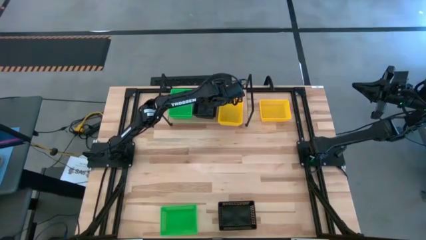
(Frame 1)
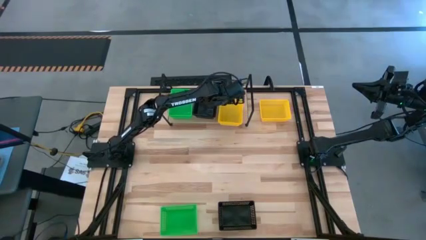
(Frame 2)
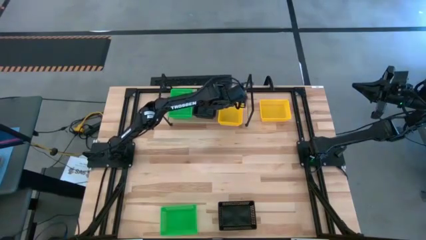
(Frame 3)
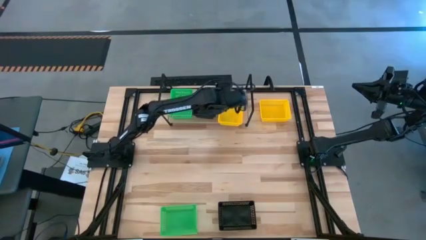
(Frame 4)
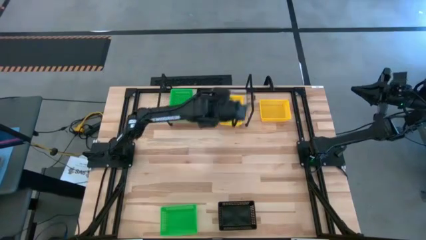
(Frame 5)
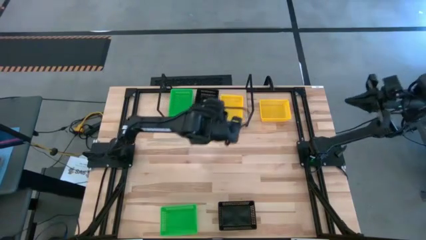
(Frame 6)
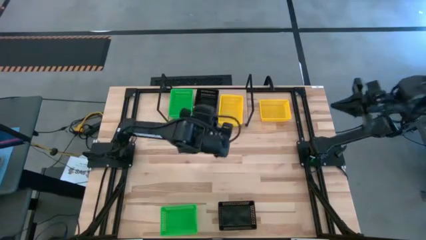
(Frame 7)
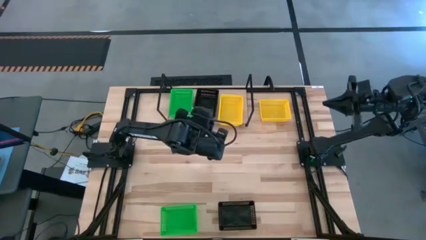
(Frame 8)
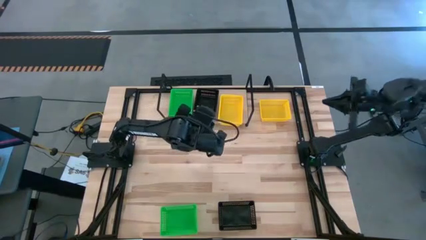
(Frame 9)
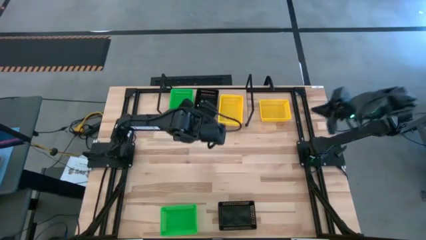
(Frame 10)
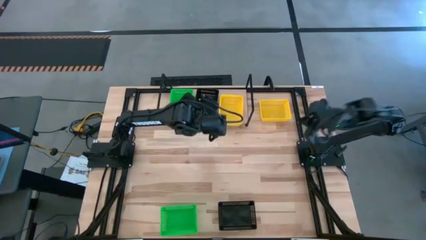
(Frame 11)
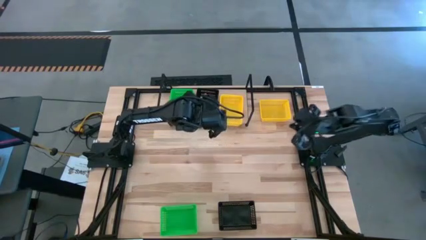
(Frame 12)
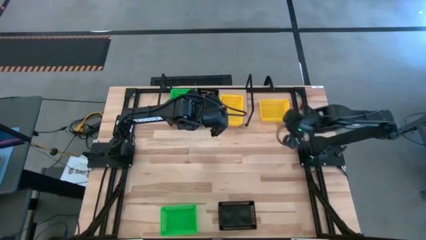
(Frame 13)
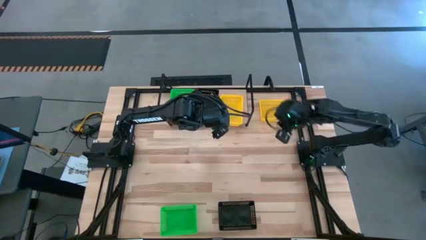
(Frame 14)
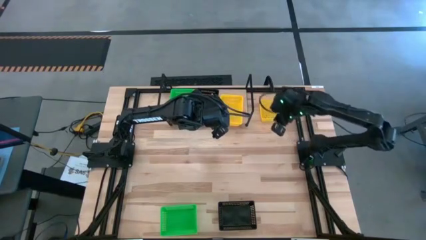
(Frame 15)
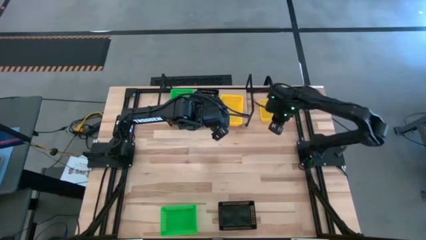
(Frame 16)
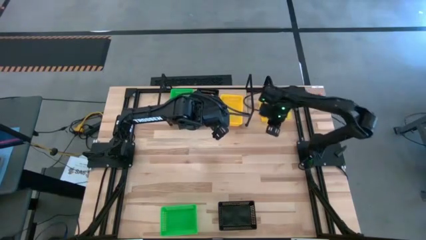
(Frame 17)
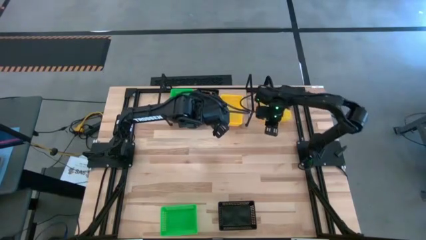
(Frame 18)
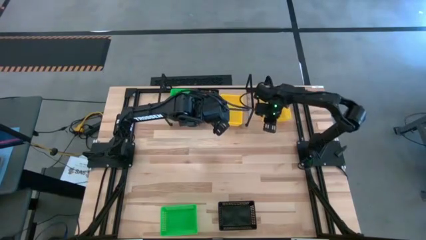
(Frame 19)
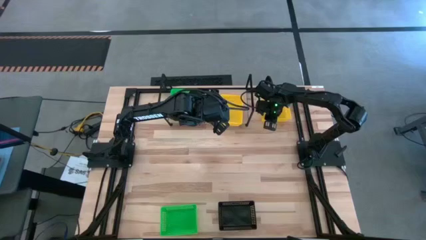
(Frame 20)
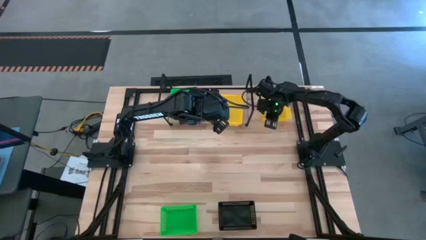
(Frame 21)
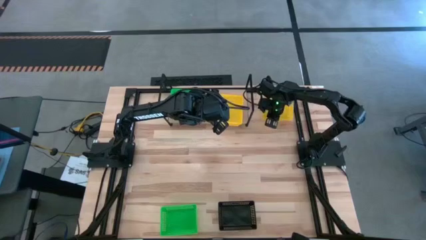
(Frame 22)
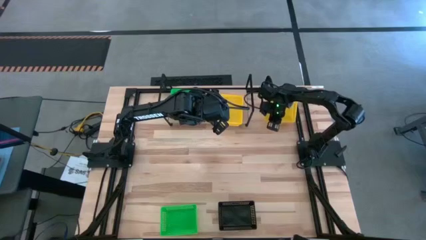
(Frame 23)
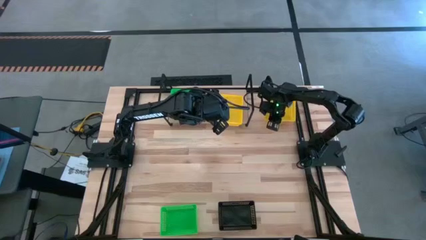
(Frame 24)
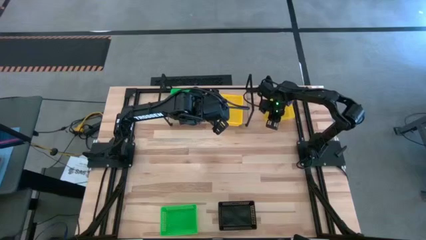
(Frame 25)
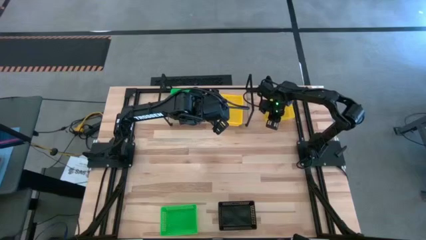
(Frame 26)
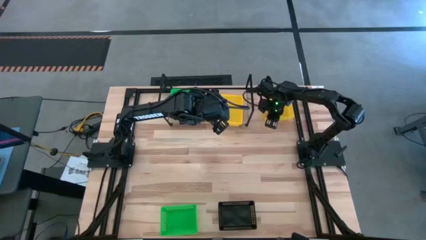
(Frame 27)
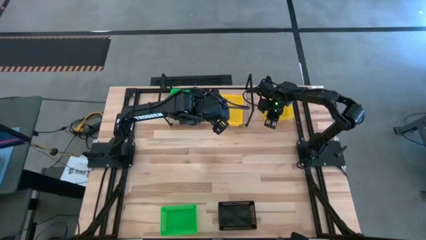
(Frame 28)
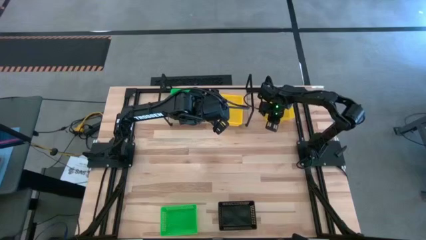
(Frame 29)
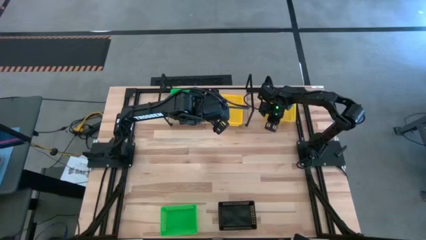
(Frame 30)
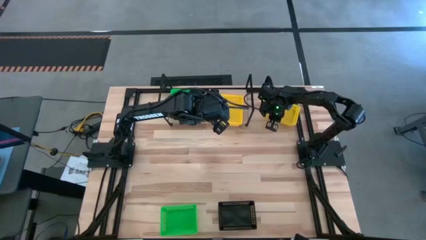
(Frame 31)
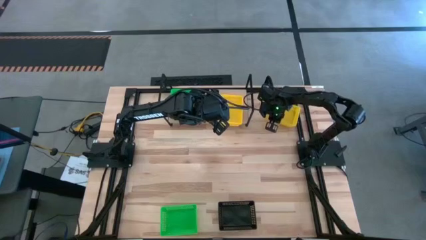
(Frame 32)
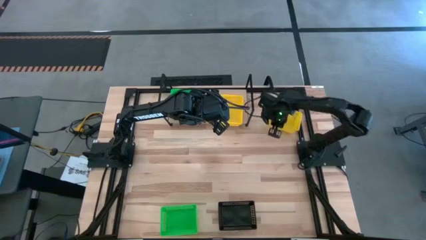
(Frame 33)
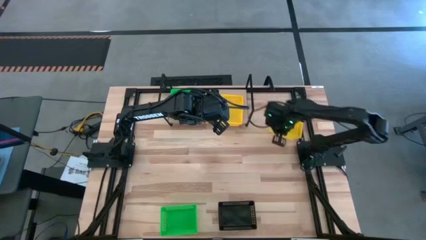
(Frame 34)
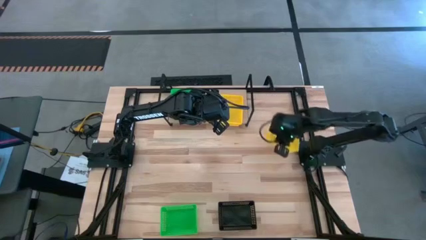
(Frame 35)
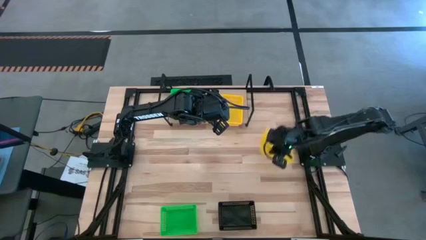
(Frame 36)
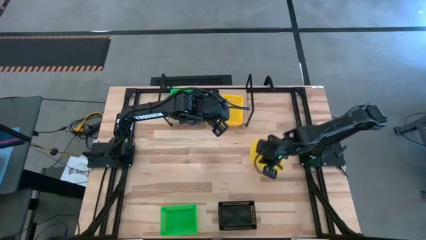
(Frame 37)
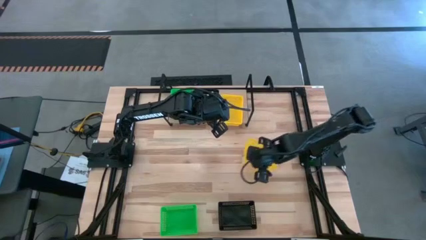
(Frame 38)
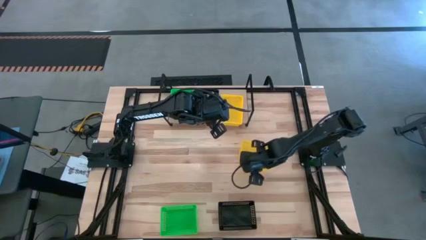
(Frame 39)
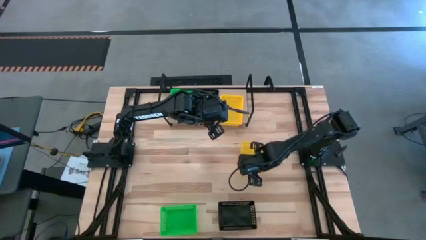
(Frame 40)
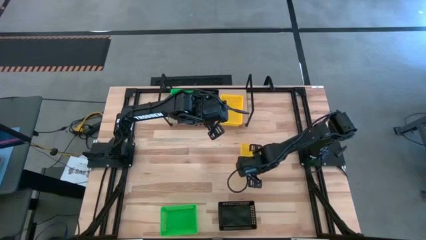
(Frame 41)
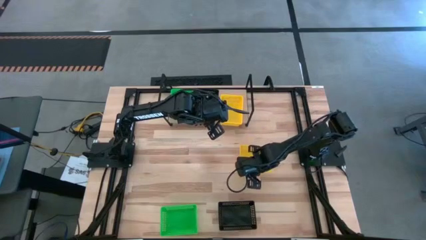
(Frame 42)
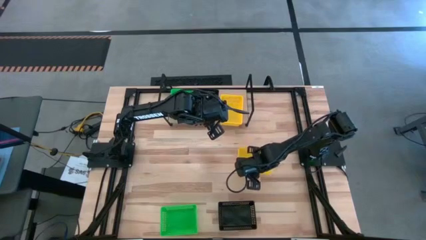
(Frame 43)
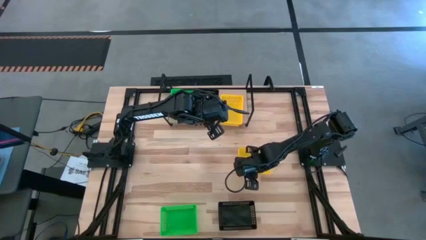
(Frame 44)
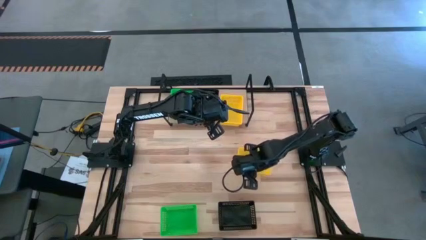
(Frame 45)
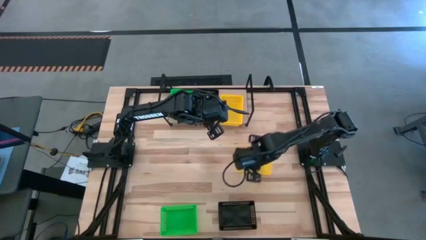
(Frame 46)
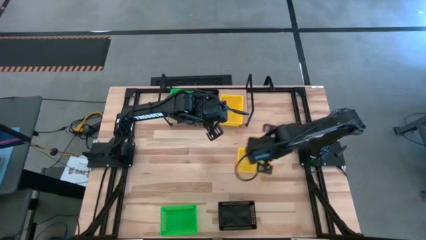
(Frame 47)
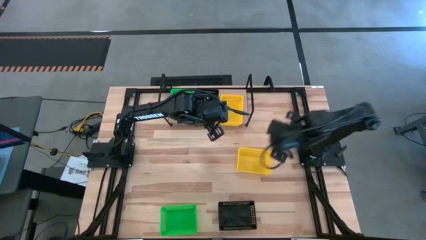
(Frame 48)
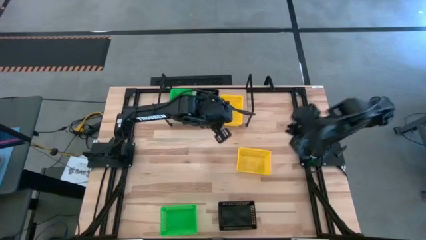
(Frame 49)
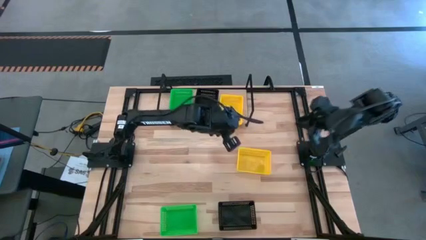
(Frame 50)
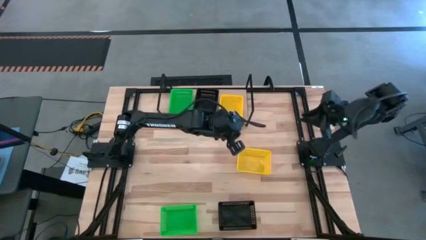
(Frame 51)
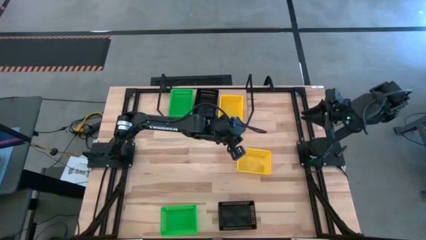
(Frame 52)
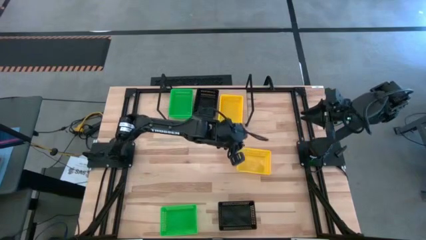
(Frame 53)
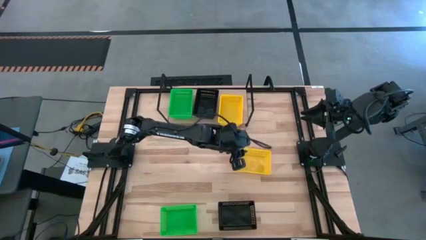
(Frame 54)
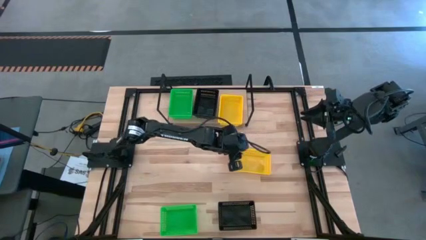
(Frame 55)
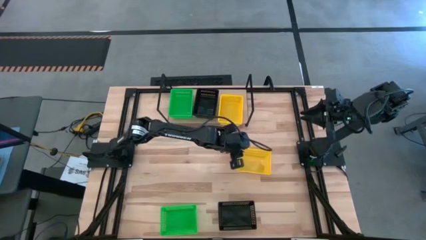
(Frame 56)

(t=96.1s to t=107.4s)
Task: Stack baskets on shelf by color
Stack the yellow basket on top of the yellow basket on the shelf
